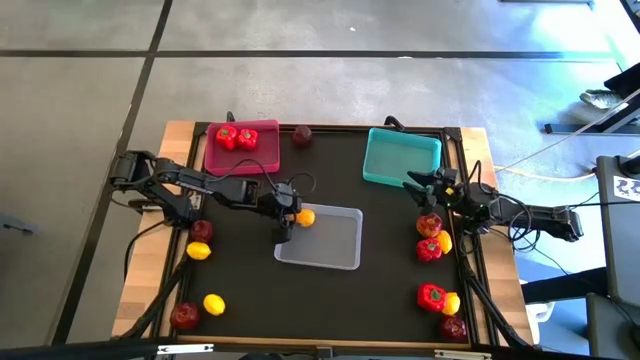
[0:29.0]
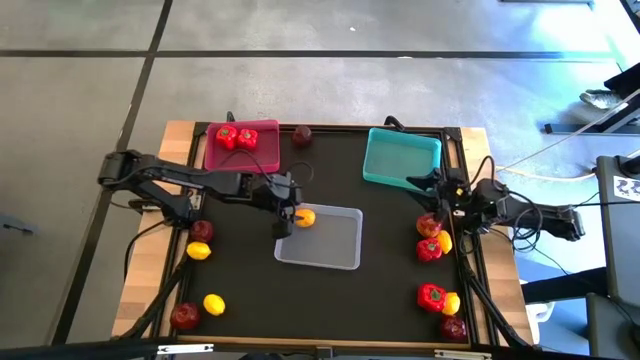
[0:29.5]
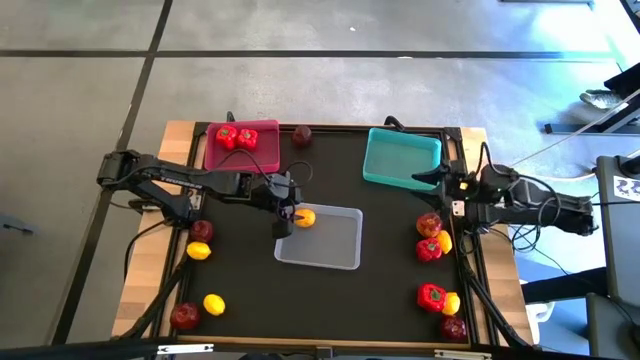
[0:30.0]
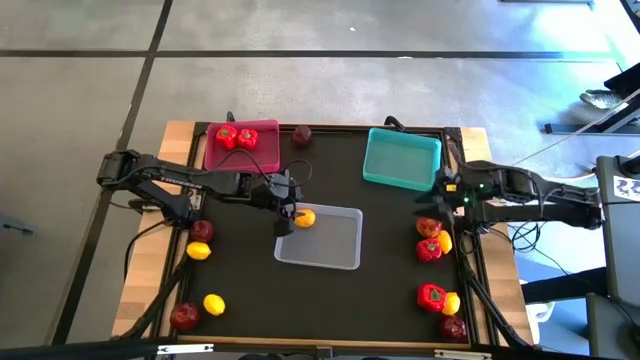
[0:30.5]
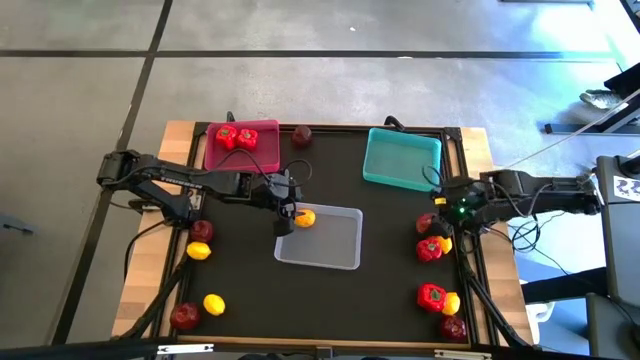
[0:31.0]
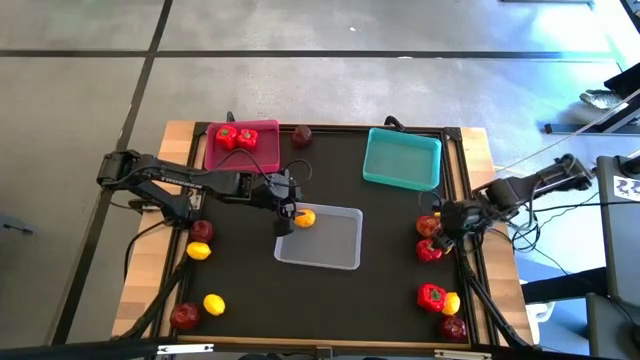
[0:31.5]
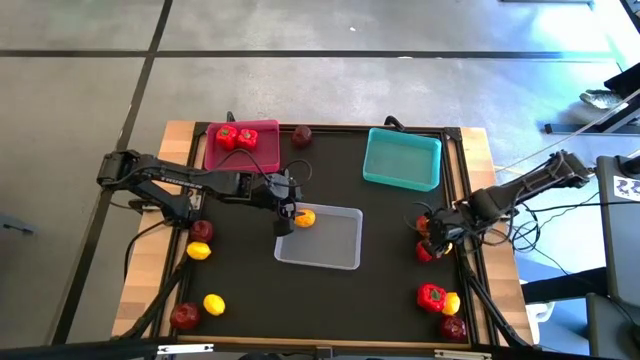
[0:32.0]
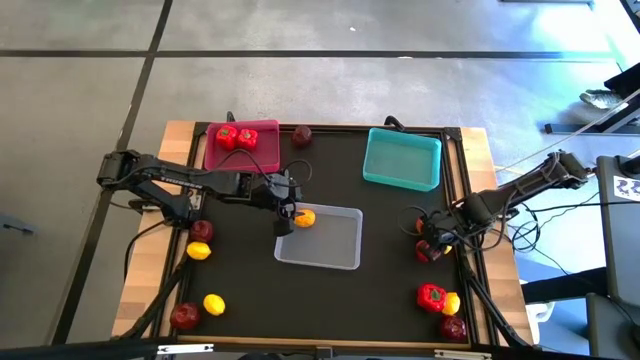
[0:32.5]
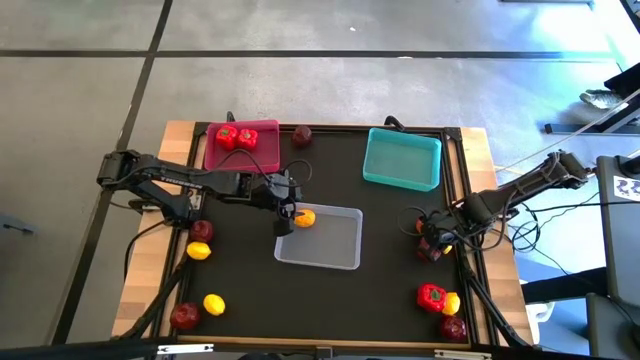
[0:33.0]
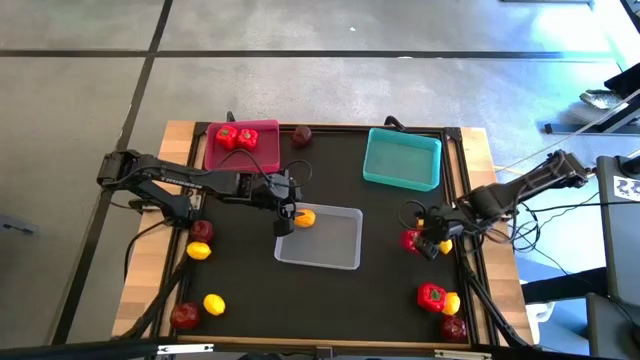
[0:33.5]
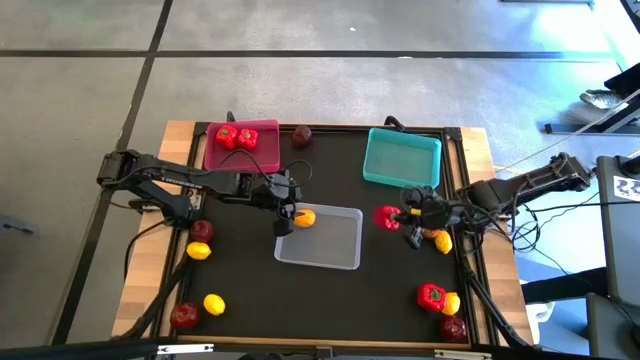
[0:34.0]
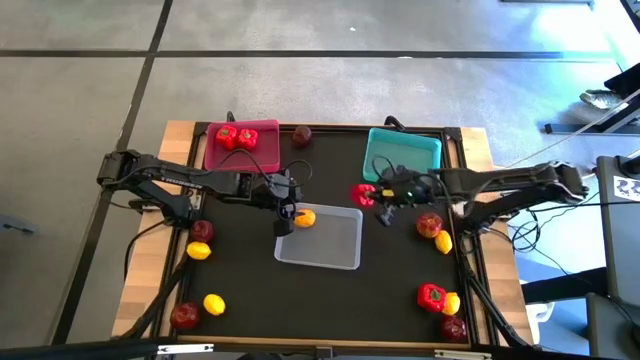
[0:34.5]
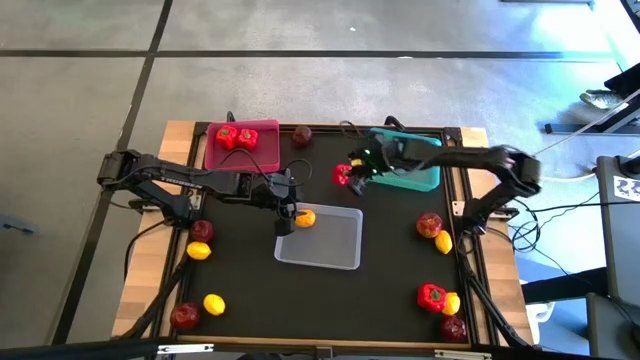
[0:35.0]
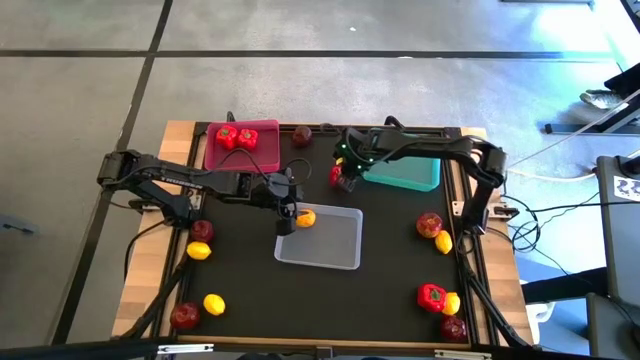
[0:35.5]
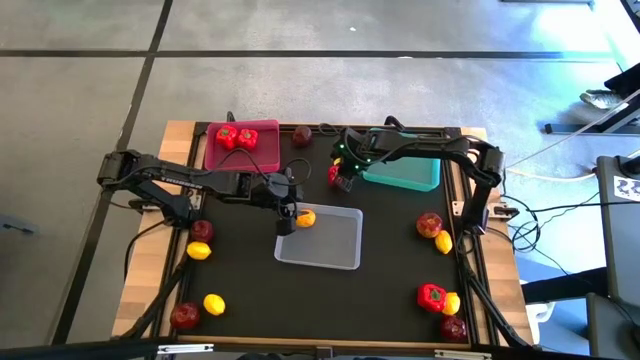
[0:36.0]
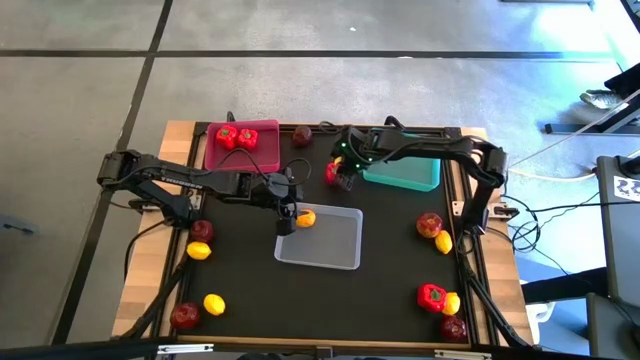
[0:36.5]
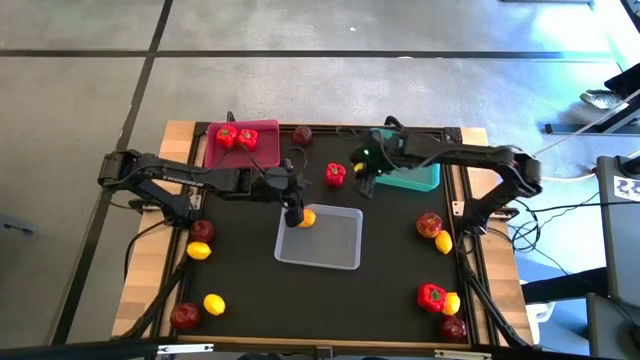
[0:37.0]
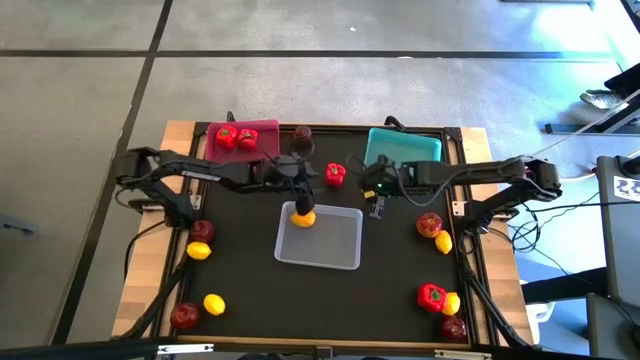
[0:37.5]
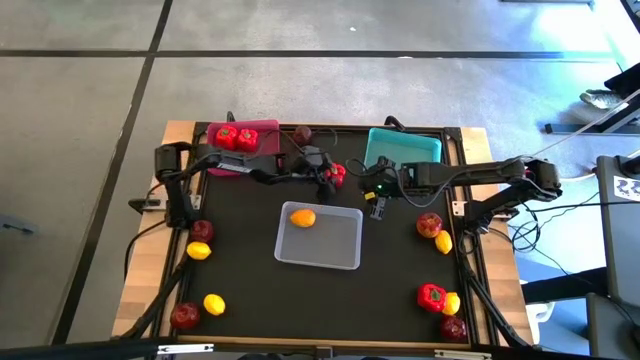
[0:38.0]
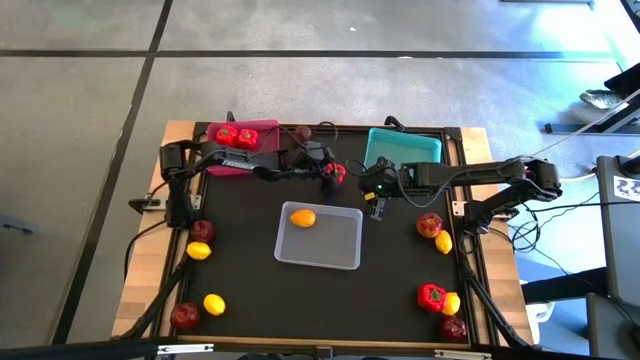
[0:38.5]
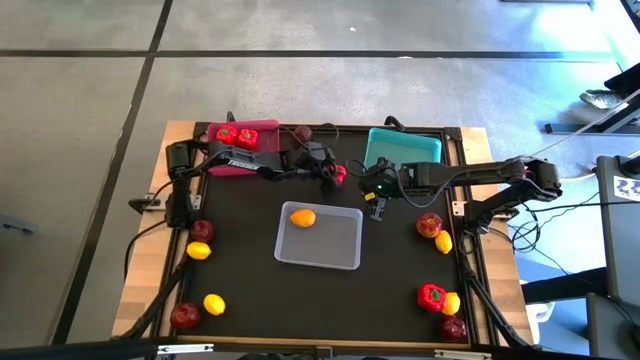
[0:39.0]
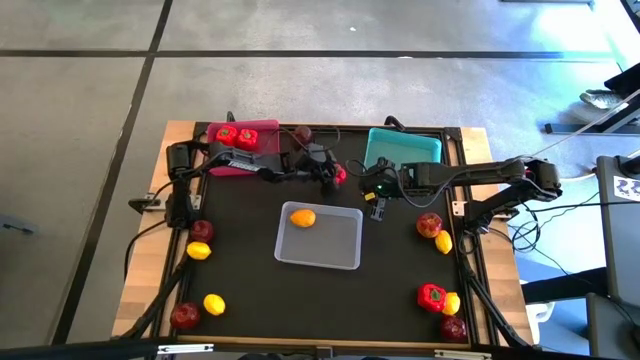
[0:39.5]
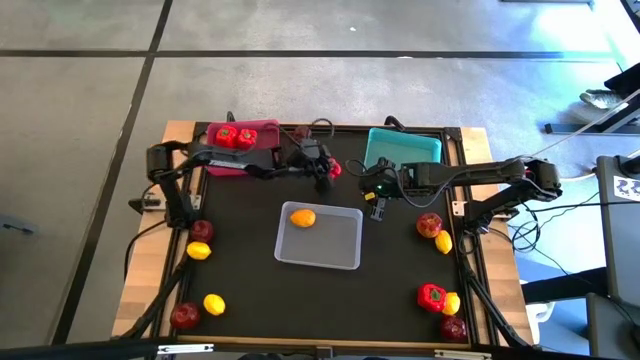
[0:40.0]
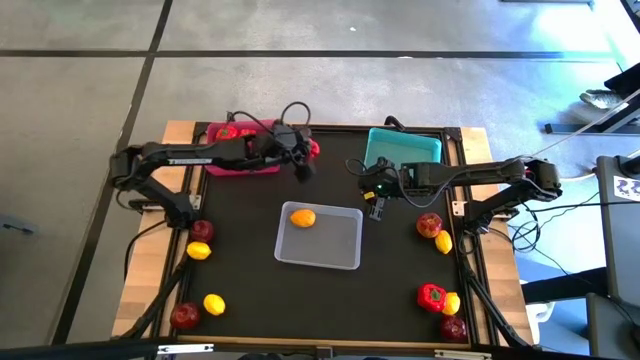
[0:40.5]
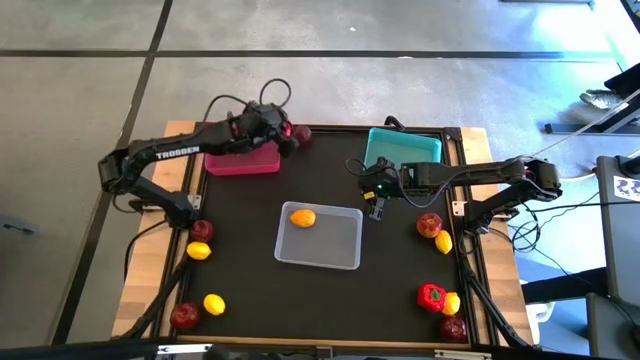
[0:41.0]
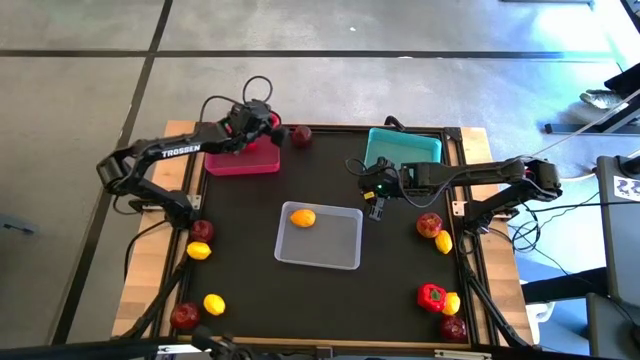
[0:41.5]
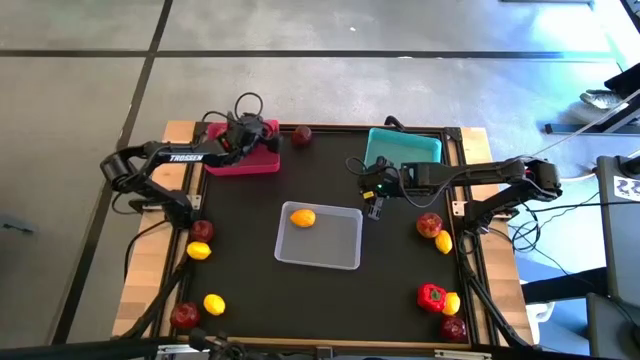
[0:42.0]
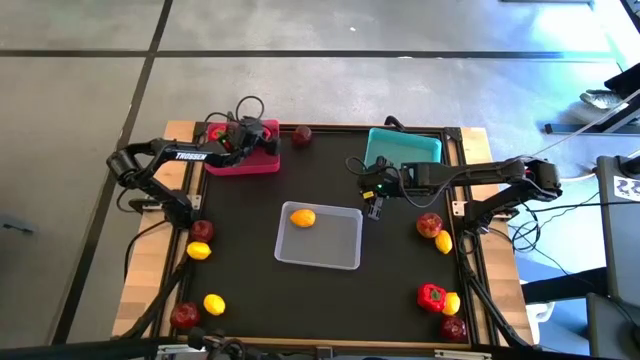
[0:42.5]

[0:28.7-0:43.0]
Task: Sort produce into baskets
Put the bell pepper into the pink bin

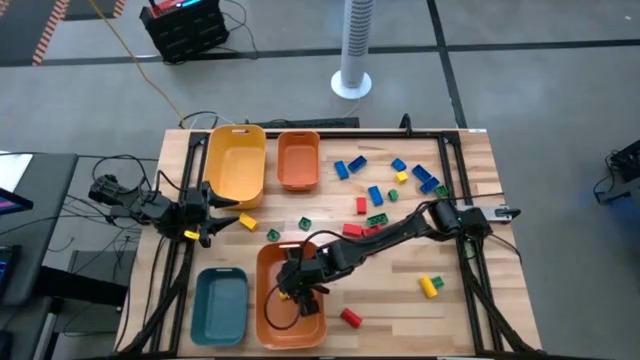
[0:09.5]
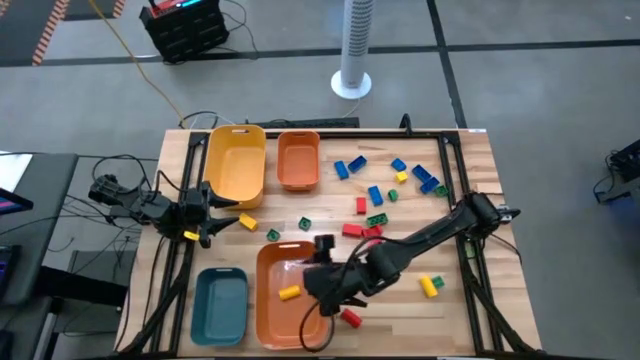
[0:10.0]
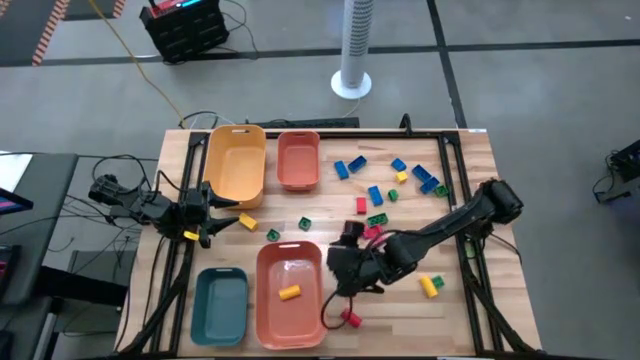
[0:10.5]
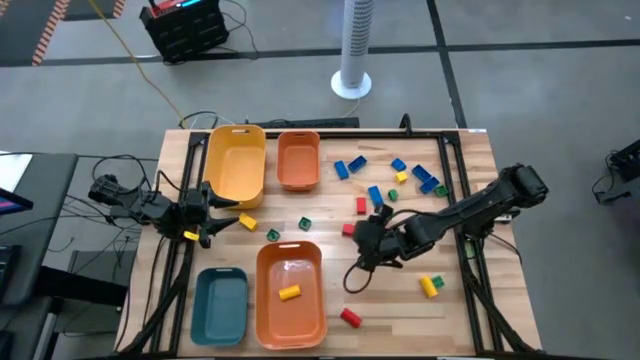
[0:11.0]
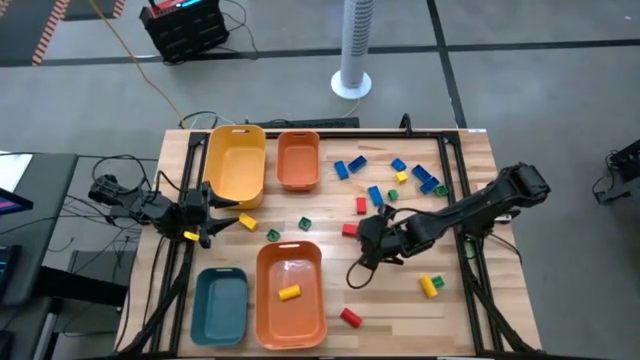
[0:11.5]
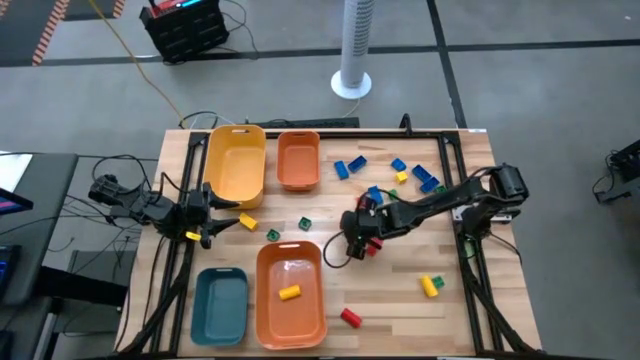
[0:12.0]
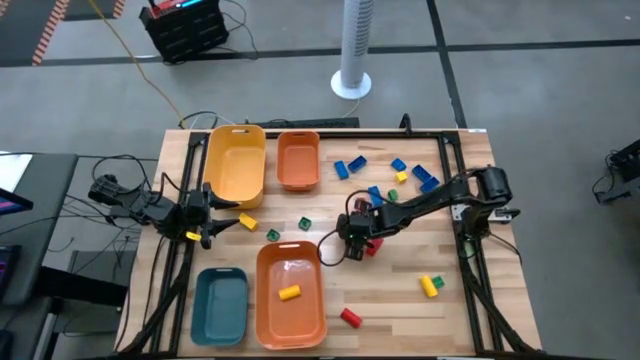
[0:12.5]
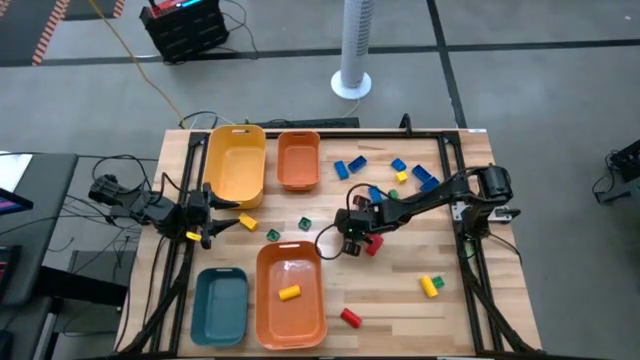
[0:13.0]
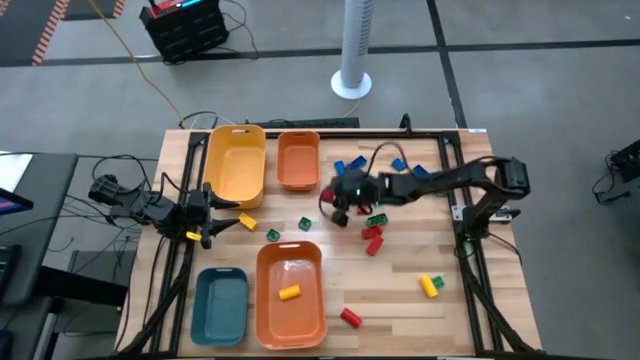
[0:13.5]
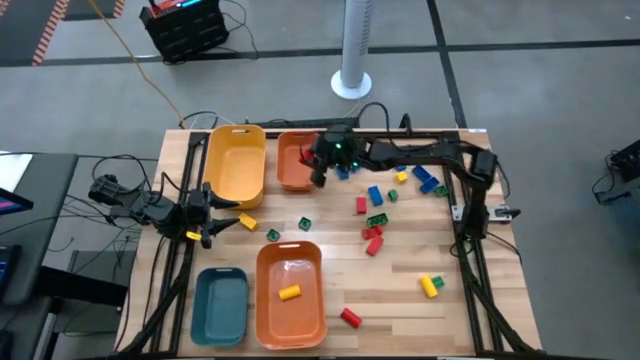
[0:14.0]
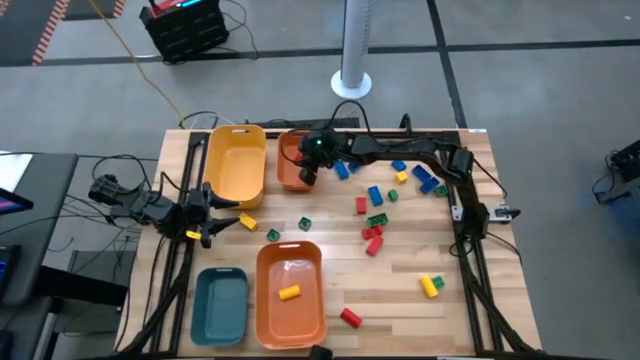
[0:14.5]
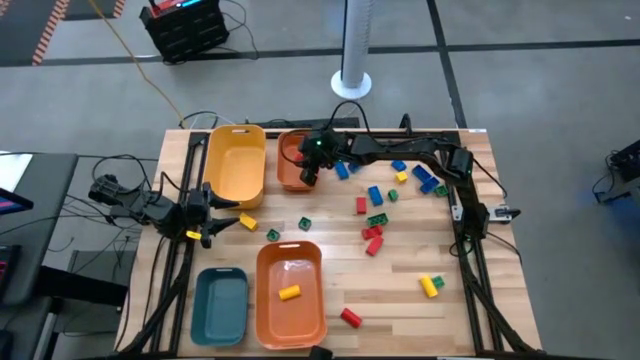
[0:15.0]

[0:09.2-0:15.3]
Task: Sort blocks
Put the red block into the top orange bin
